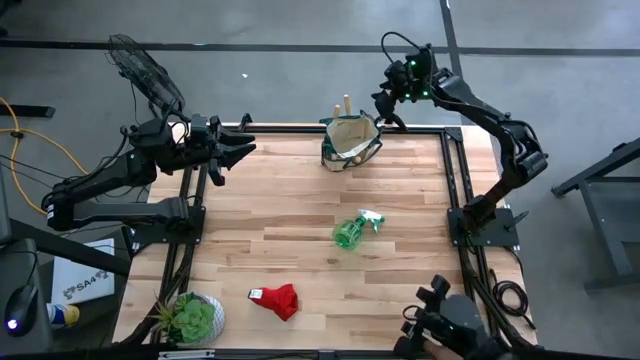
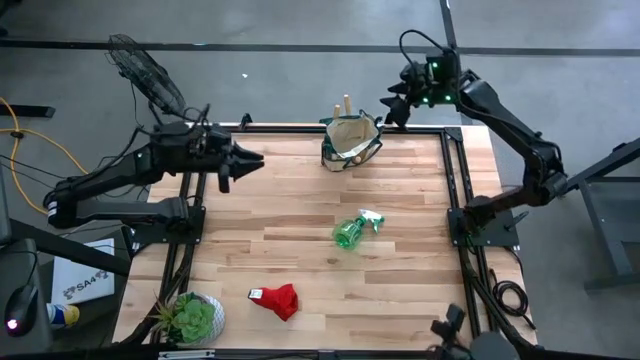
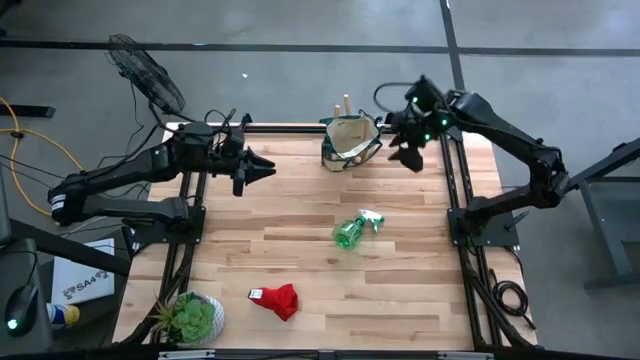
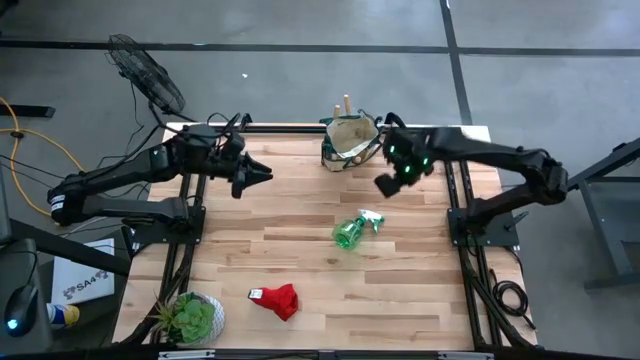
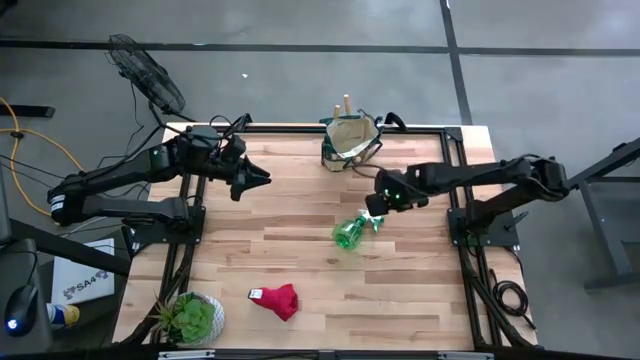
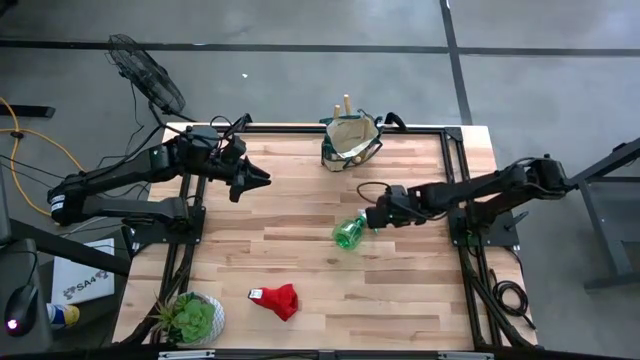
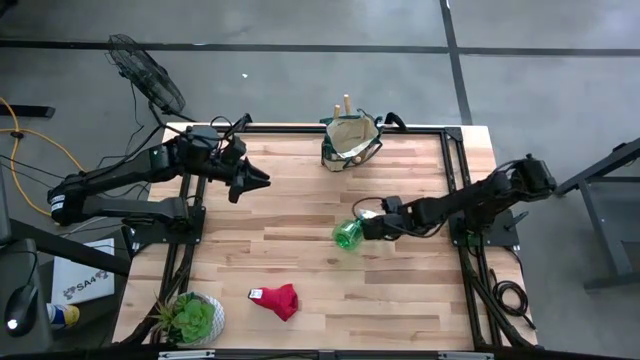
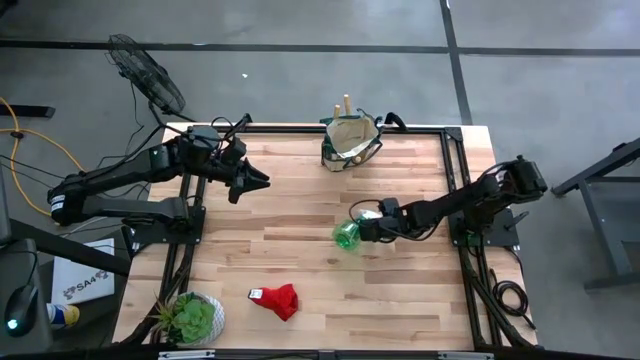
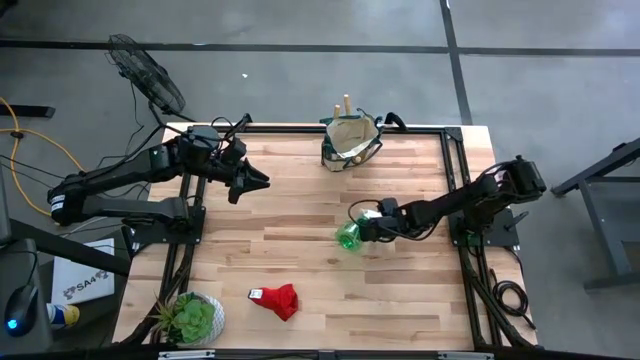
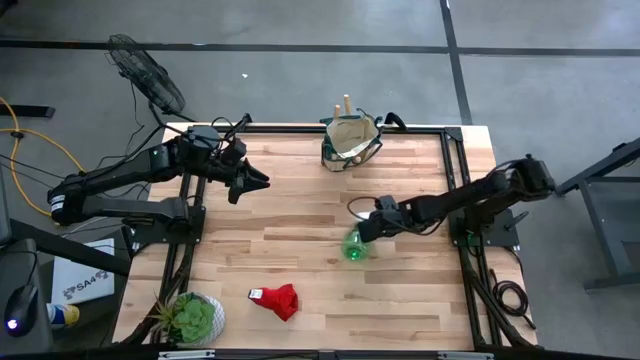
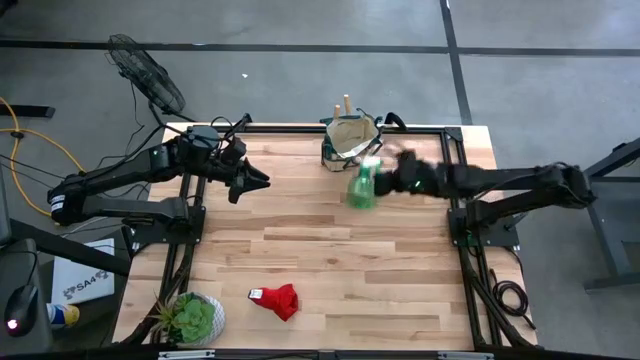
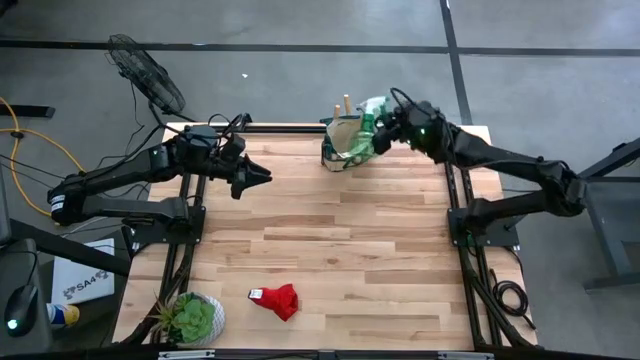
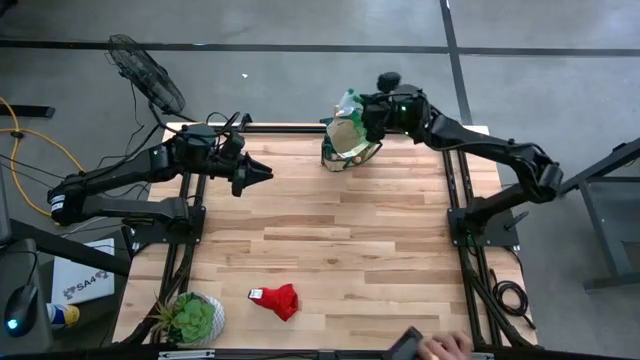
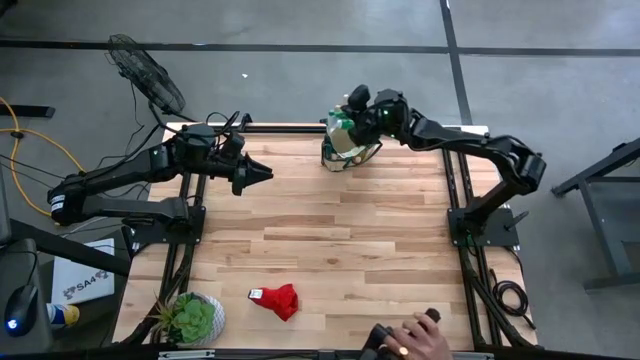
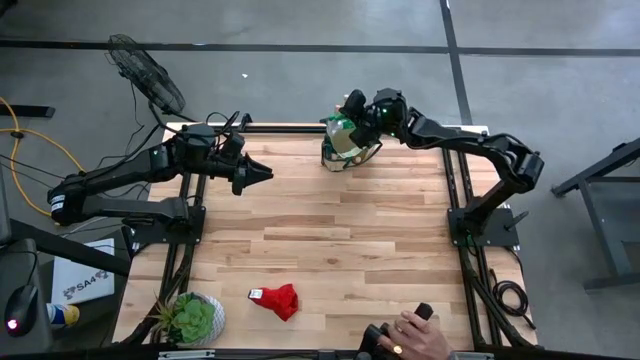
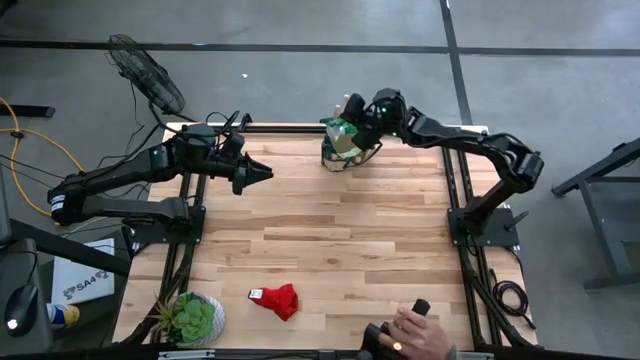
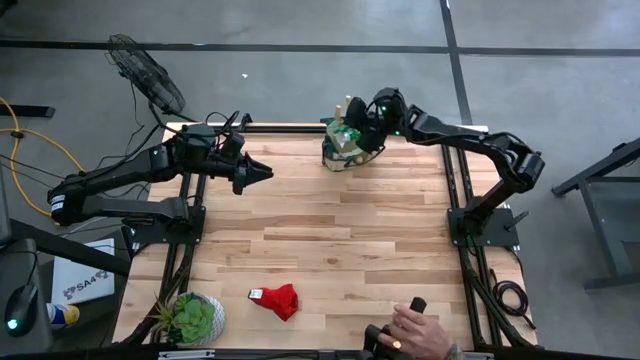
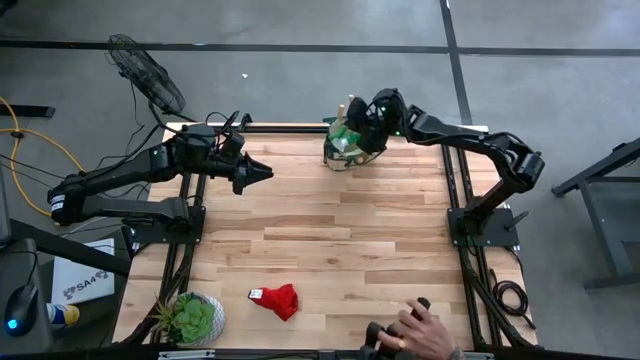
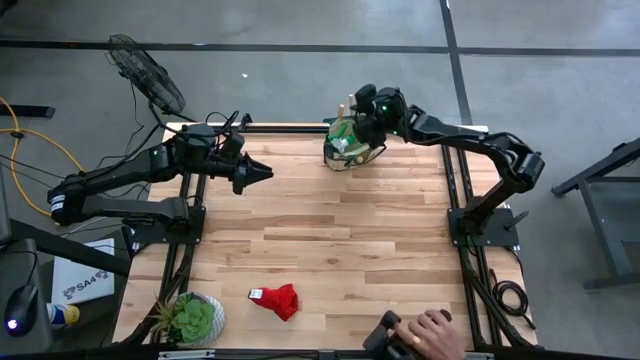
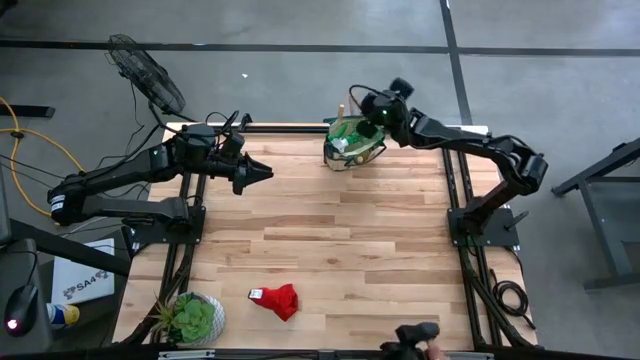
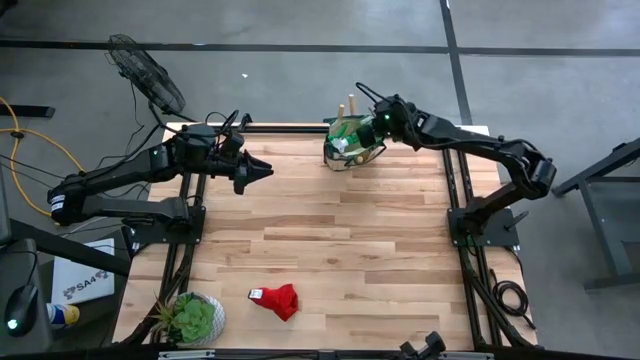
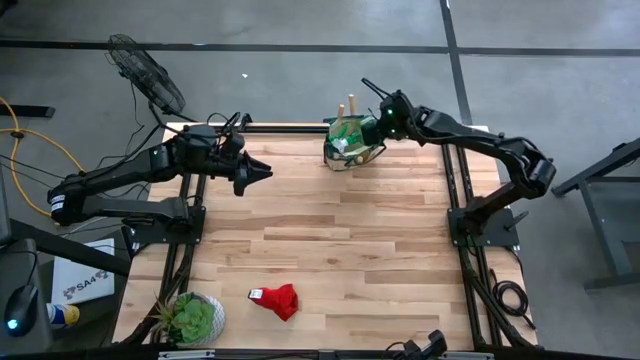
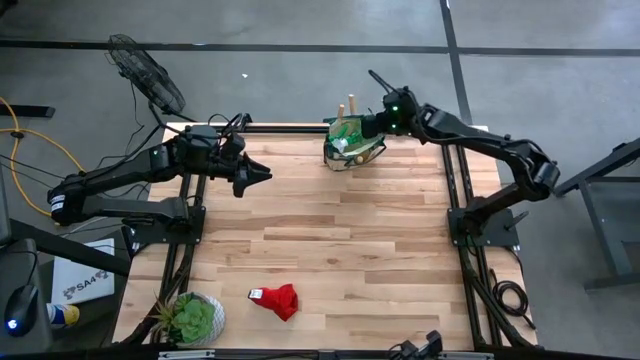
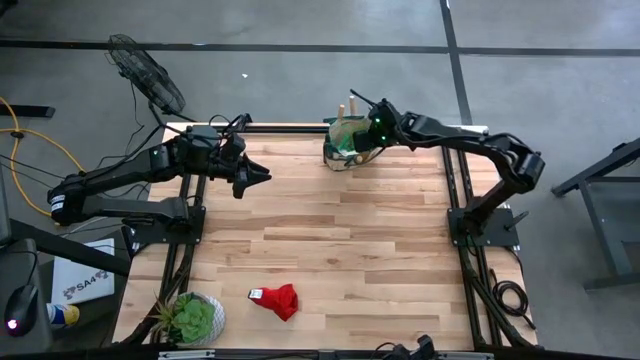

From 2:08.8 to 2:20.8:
Task: Pick & Place Garden tools in Gardening bag
Put the spray bottle into the gardening bag

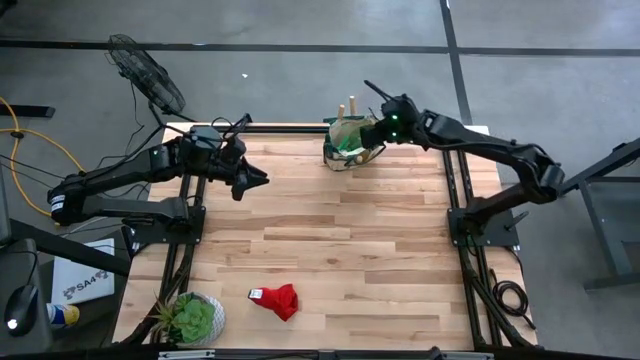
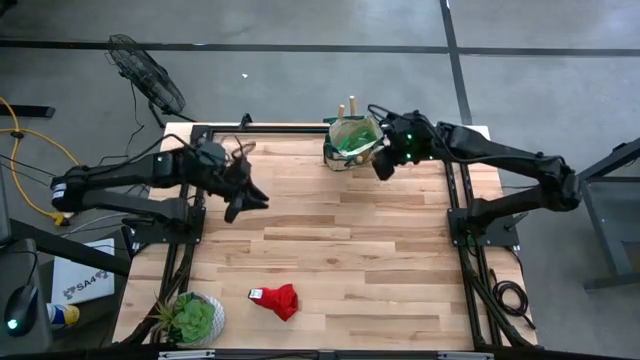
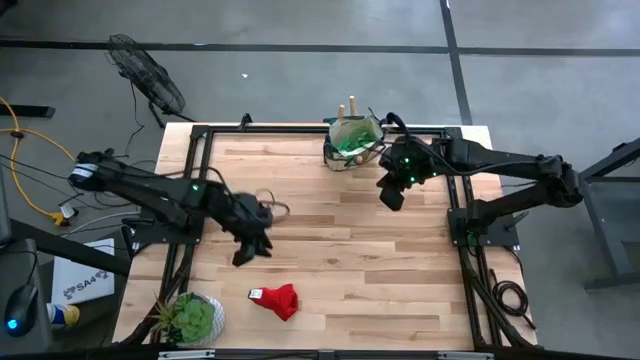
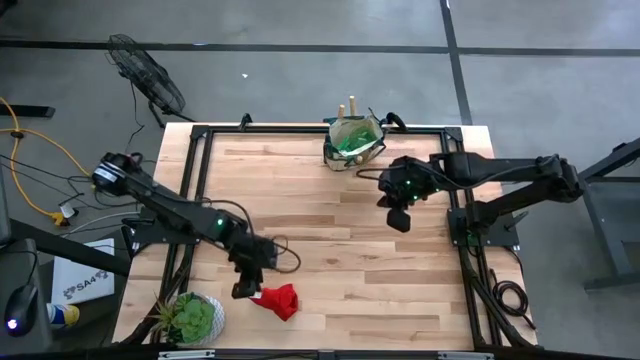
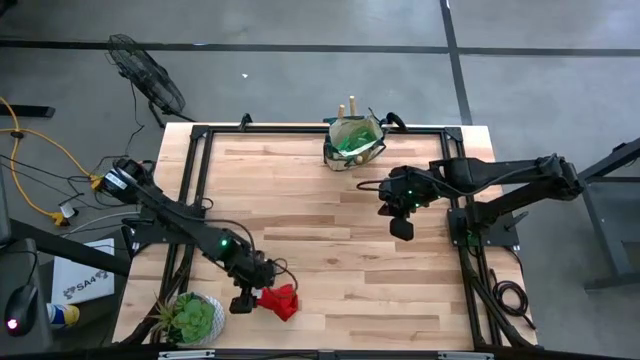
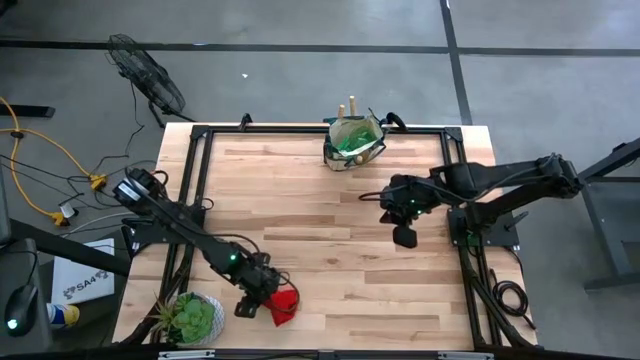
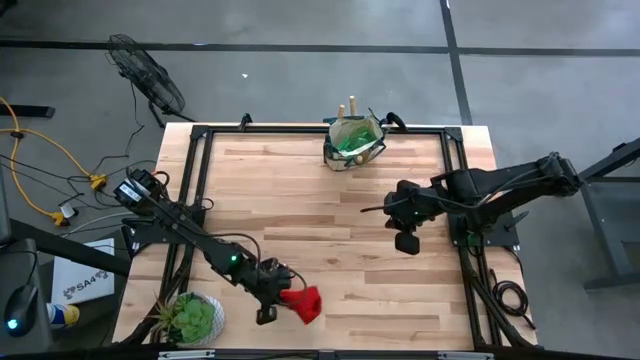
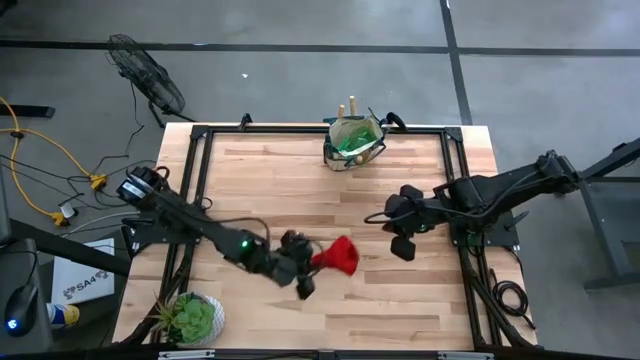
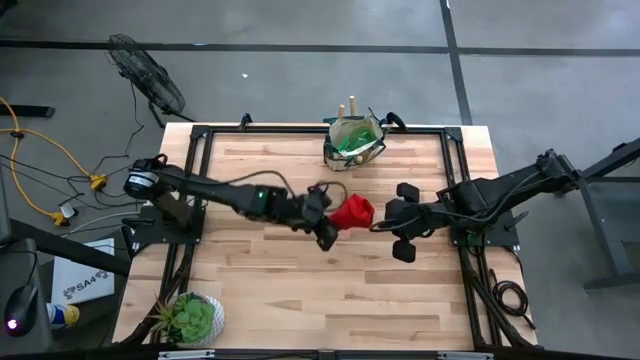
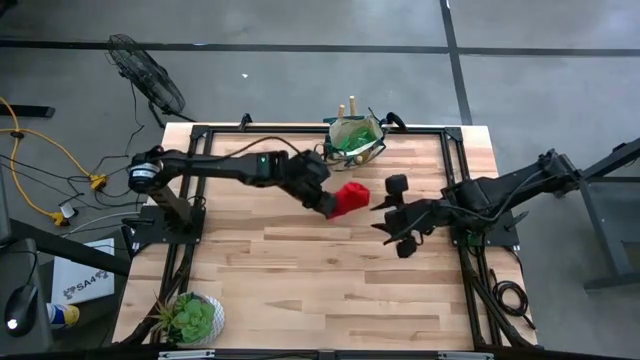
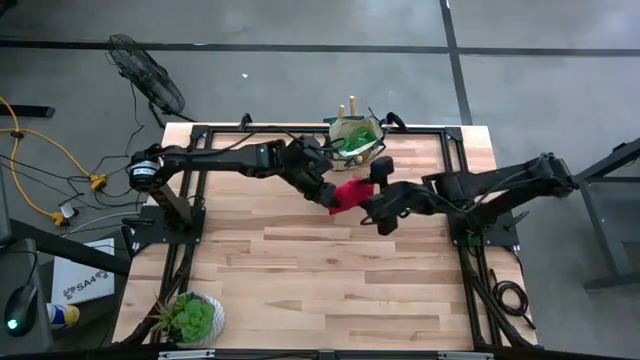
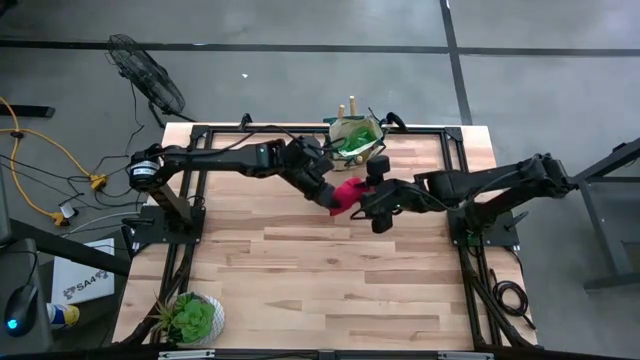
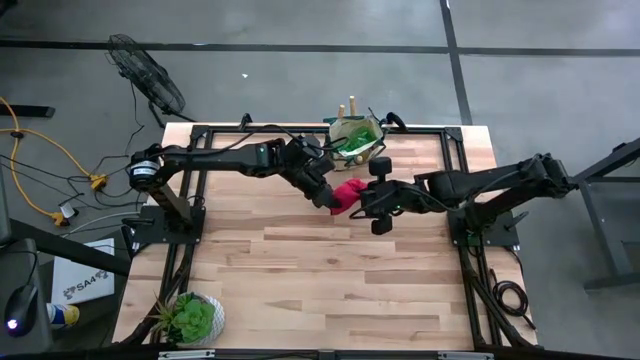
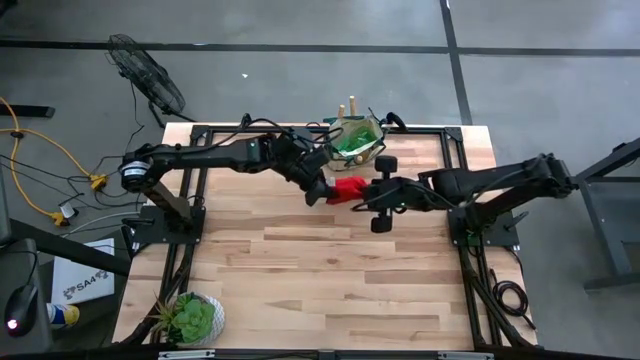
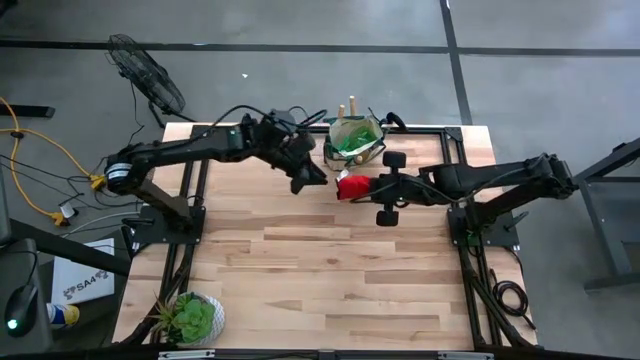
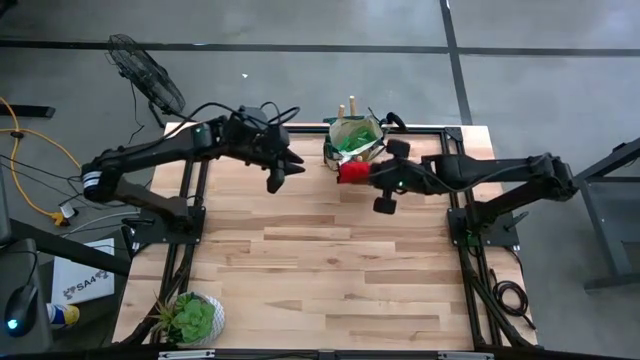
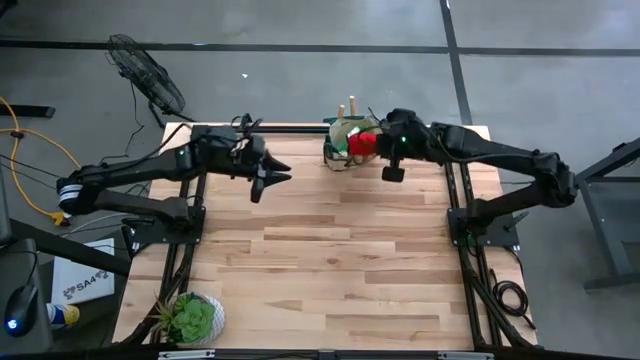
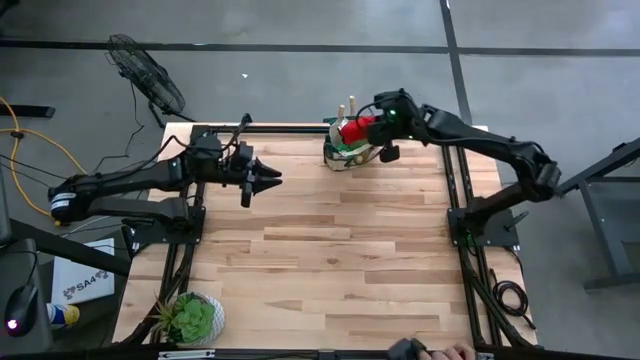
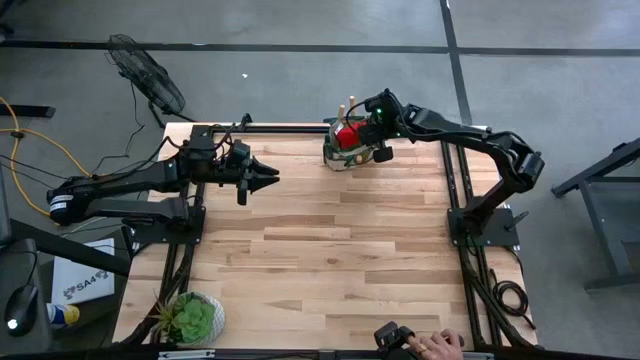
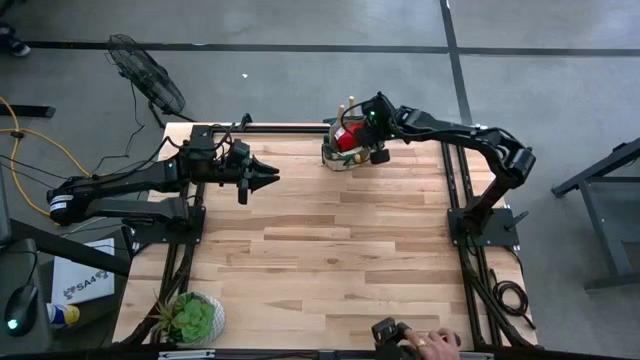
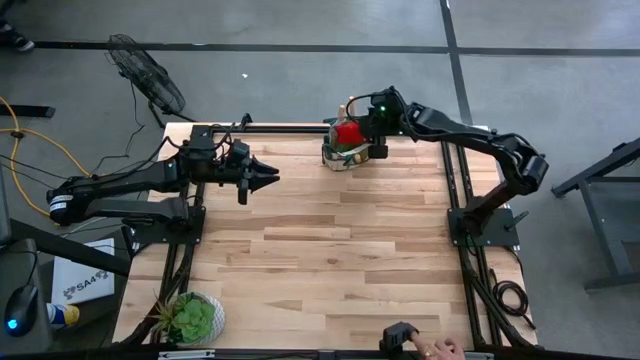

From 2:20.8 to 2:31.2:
Put the red gloves into the gardening bag
